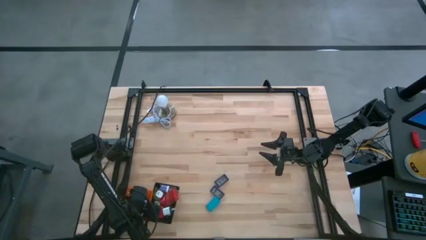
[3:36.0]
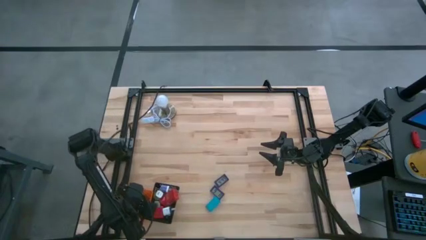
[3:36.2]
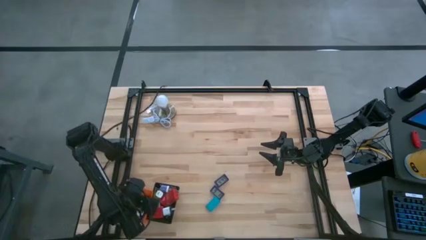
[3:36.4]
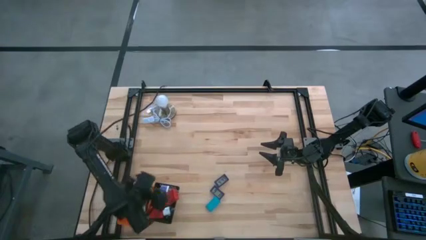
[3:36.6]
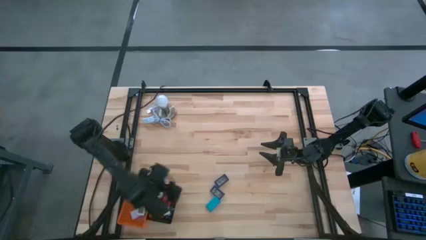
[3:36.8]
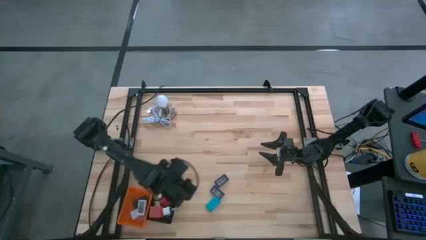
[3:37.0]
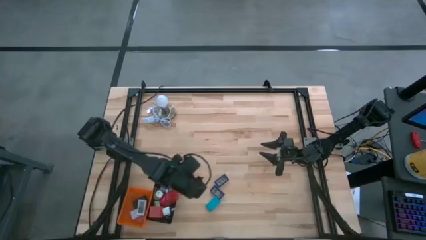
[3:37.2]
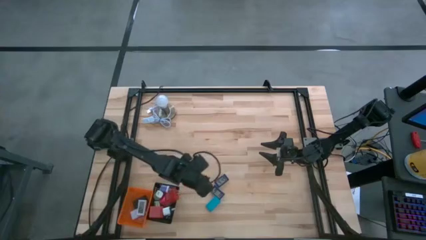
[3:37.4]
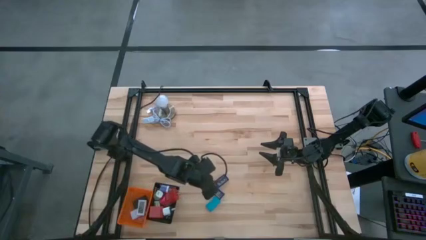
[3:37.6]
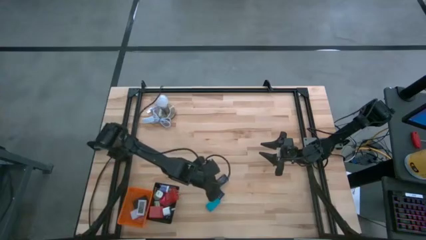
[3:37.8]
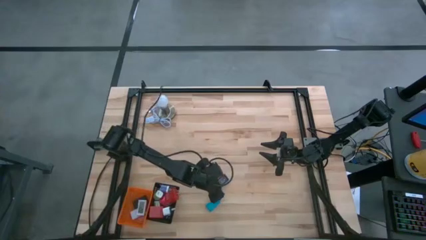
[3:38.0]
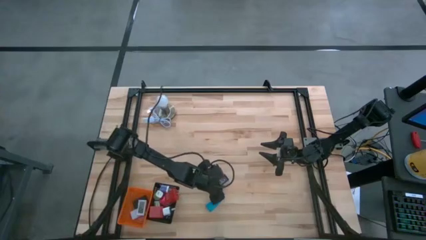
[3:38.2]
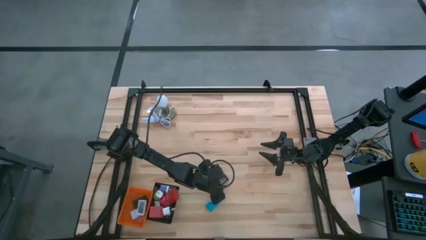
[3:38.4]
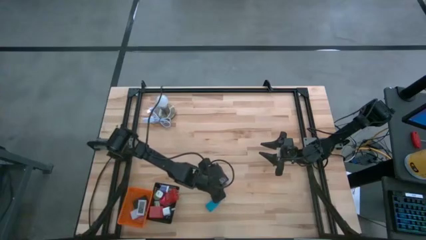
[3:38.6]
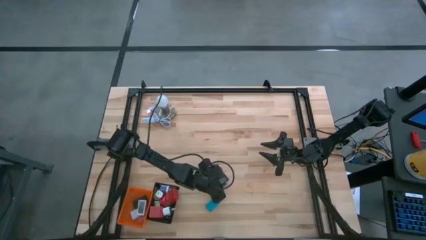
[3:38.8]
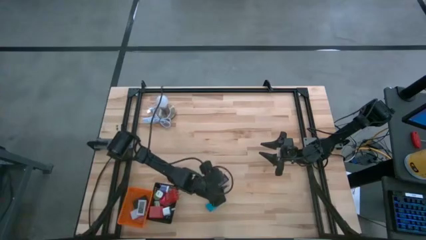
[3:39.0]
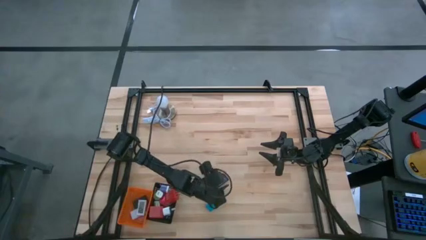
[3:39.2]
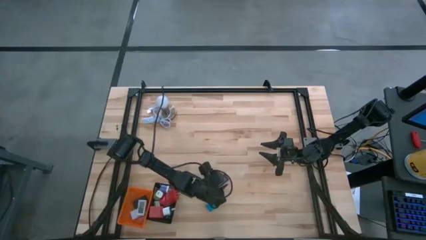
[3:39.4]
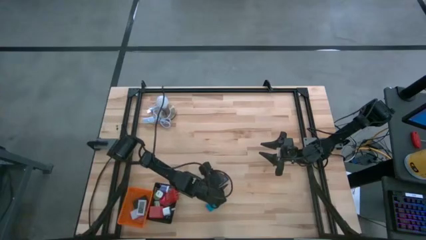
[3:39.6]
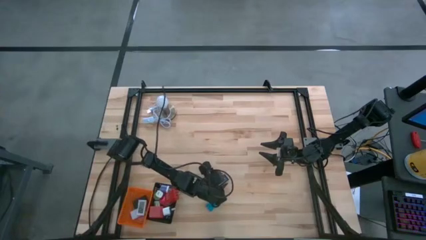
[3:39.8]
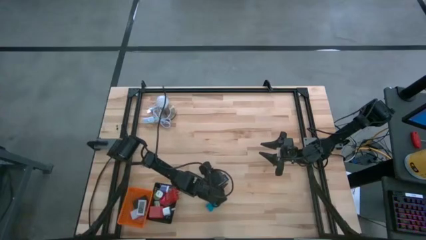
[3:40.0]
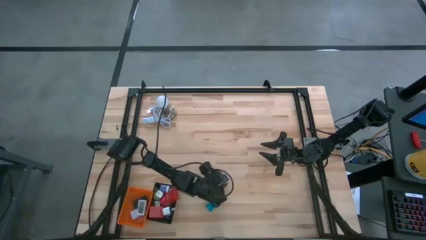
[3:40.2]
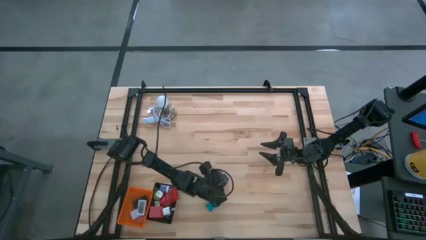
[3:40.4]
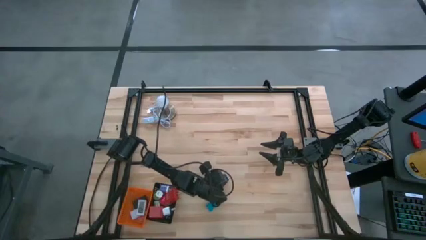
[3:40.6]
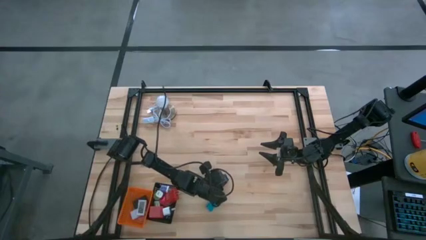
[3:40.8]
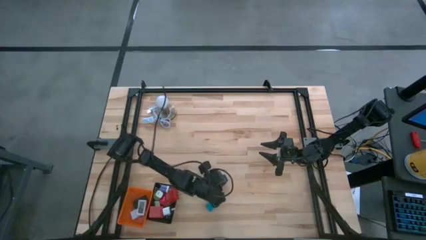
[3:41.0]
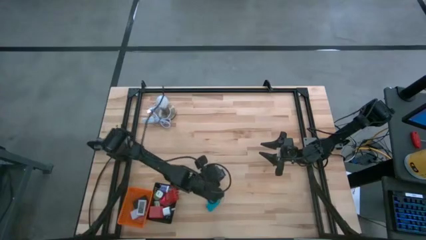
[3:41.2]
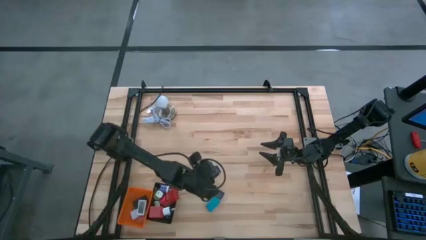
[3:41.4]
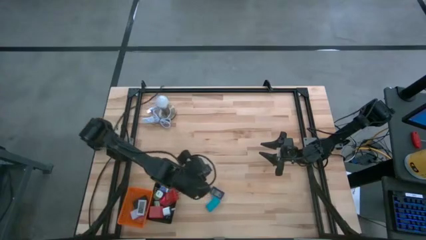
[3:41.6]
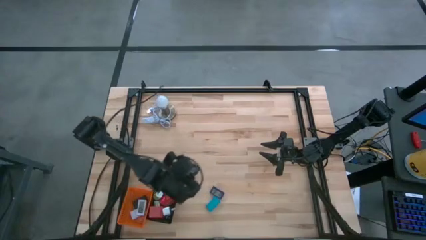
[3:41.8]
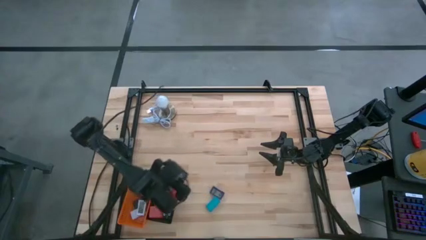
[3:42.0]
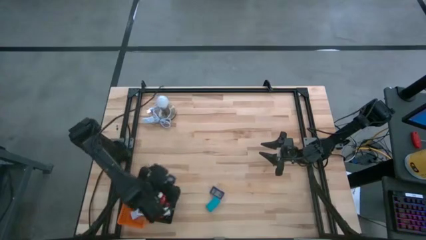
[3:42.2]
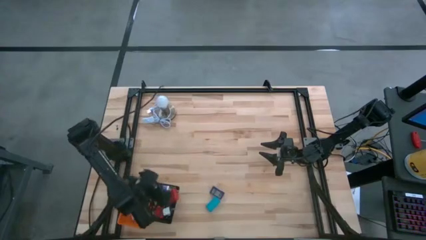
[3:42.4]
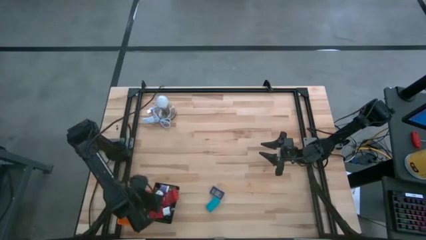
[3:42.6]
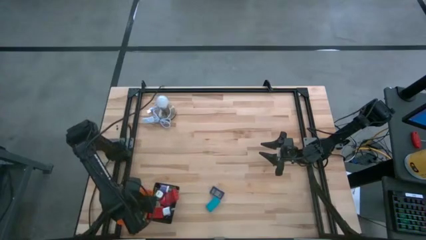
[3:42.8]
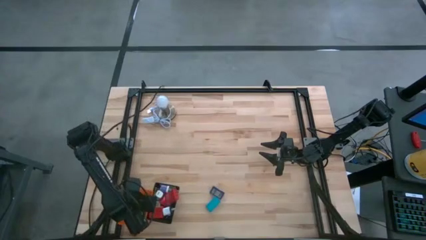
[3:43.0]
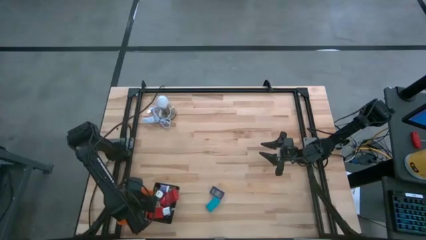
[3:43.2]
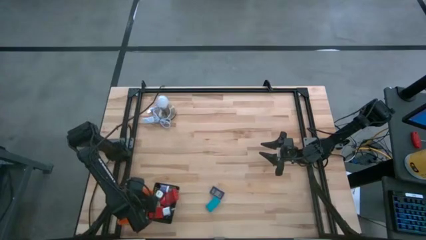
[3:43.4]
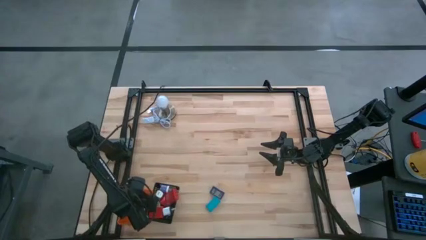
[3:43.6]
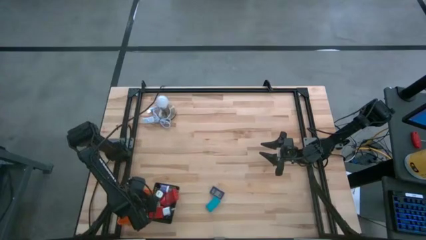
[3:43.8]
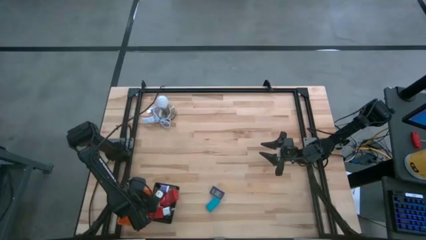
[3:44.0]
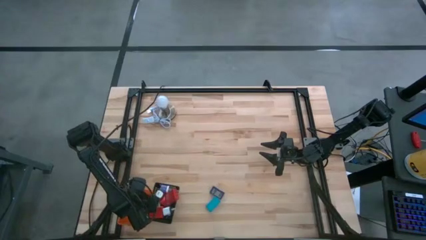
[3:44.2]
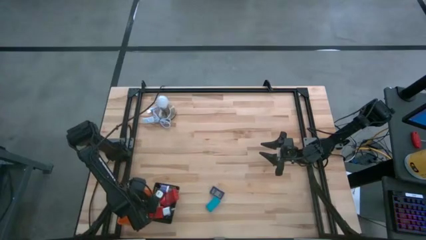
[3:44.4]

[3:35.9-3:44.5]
Task: Pick & Place Office items
Put the top dark blue digital clock into the orange basket

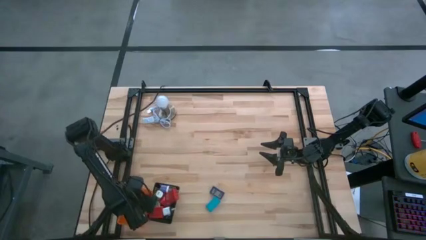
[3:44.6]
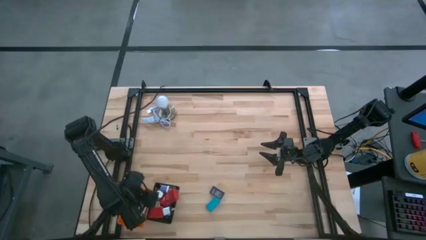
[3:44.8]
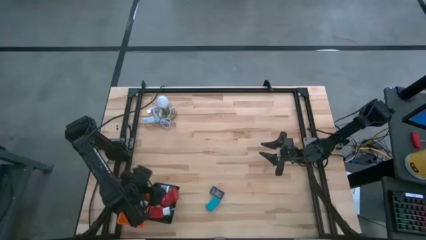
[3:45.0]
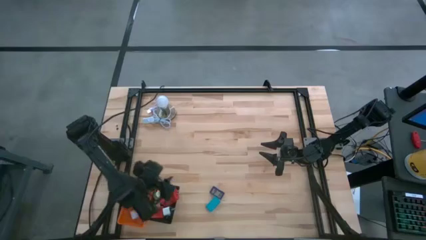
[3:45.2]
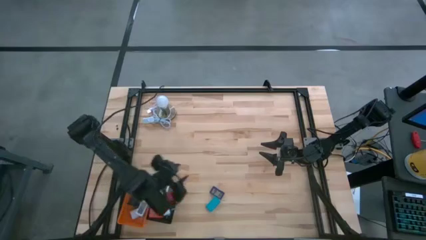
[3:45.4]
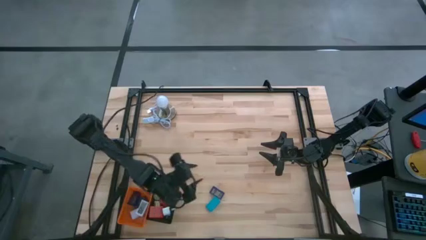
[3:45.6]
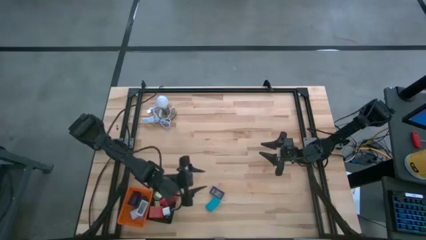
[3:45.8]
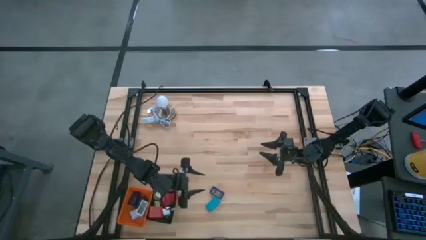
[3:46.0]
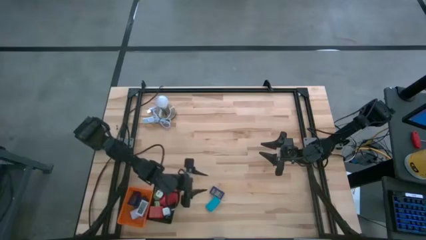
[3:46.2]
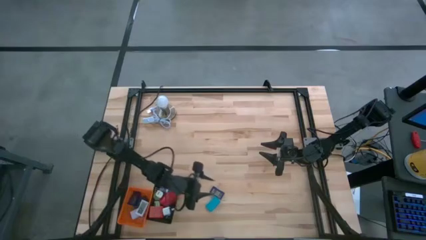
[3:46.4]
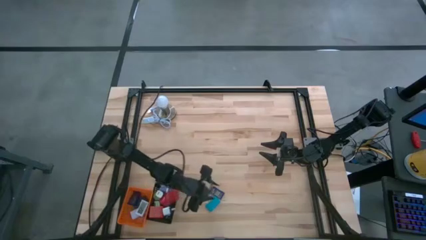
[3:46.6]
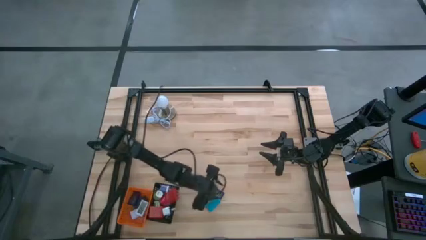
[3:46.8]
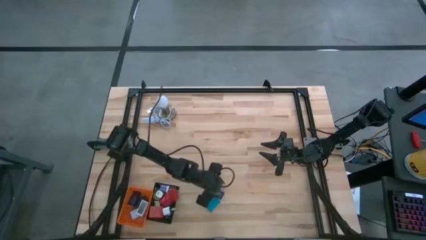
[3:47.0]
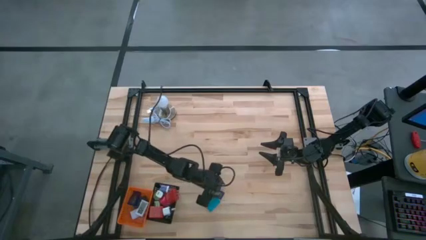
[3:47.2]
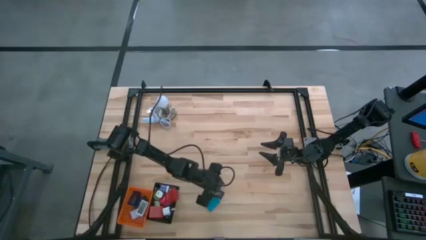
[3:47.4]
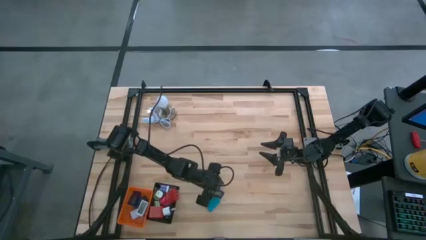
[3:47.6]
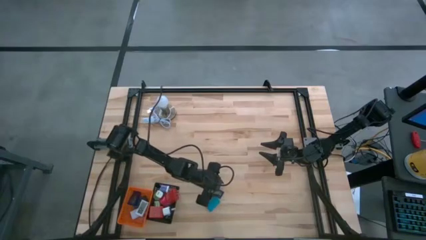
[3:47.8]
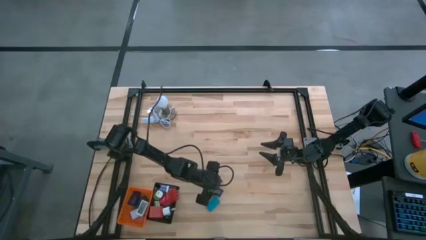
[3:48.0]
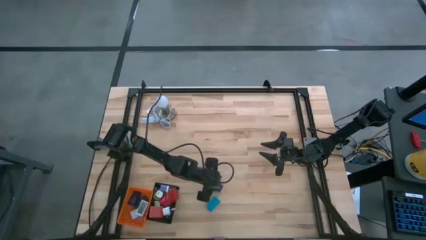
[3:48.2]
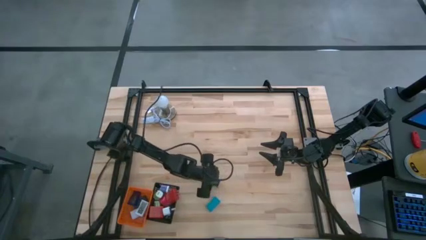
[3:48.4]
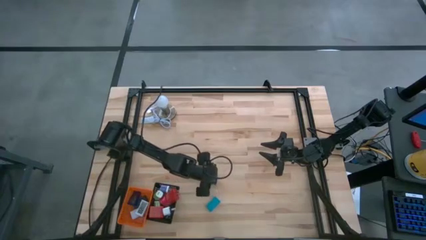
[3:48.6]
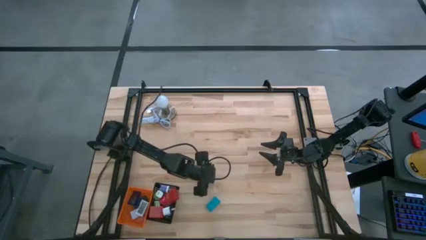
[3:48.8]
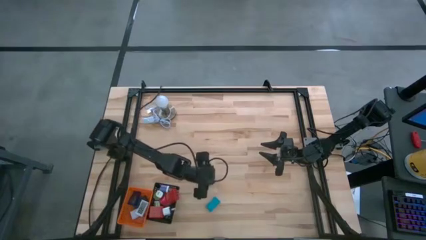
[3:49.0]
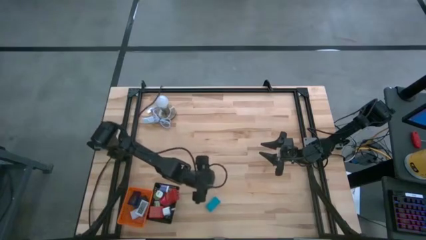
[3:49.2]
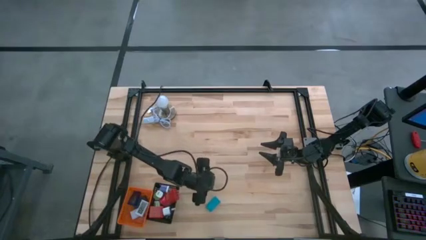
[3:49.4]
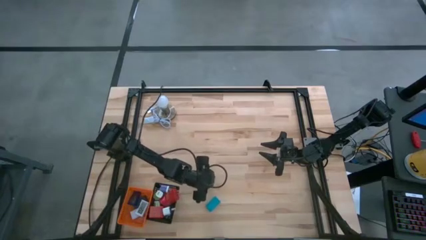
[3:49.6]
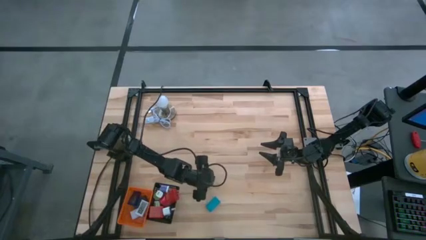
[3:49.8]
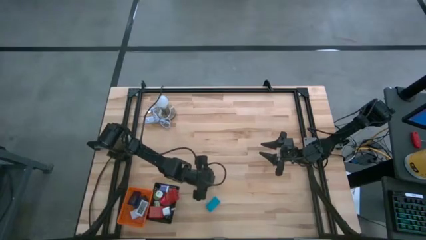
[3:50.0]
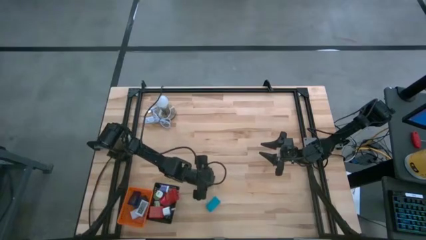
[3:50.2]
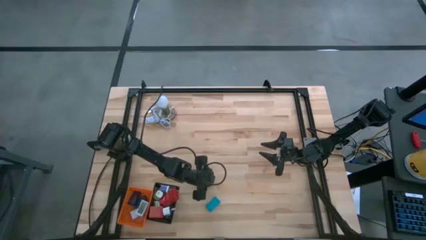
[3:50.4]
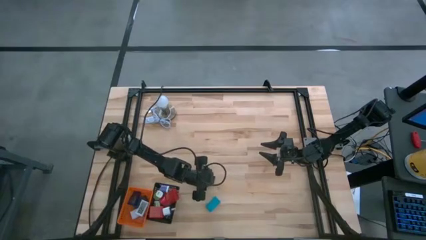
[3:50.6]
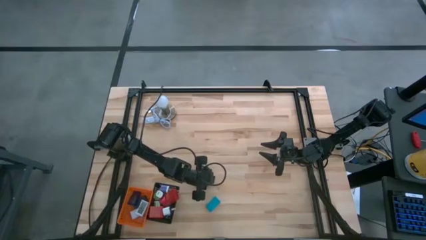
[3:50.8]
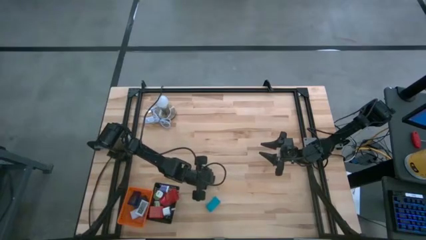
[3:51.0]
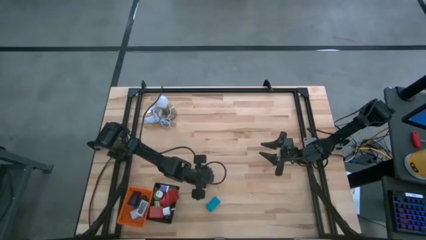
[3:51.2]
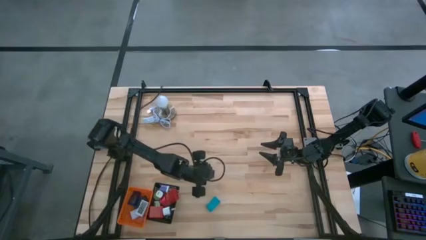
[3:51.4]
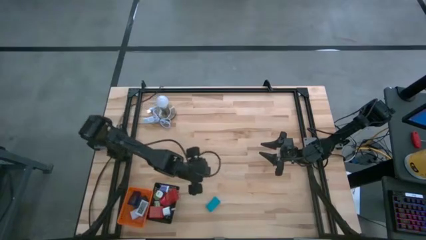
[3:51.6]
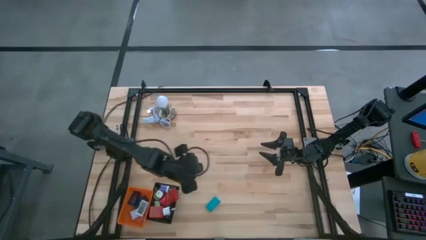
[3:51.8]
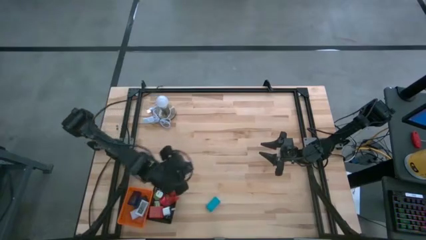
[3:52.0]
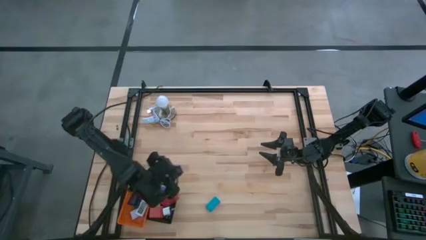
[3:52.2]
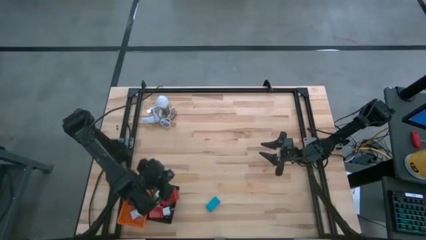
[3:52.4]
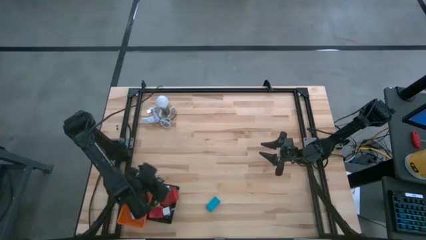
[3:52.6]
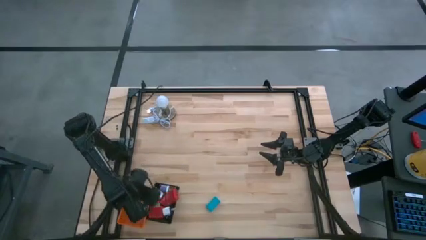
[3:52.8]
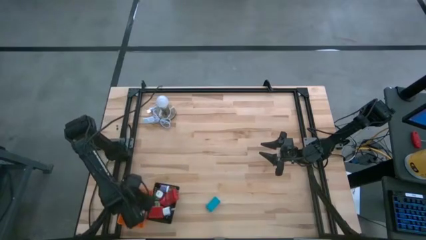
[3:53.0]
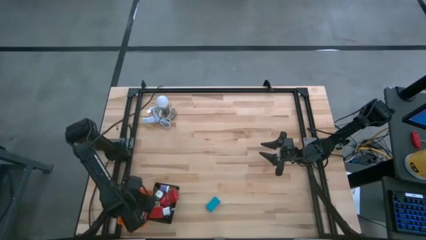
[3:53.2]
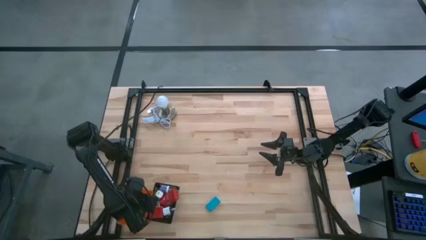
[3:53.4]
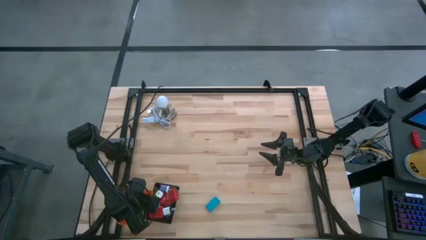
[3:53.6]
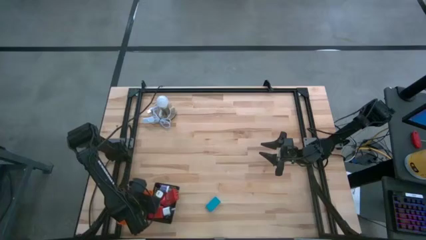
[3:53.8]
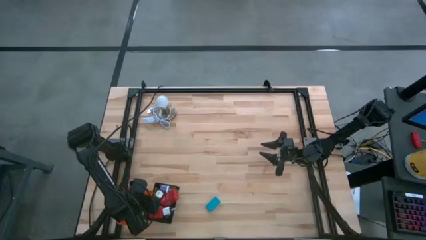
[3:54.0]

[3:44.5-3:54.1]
Put the dark blue digital clock into the orange basket
